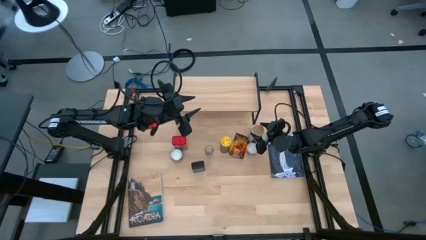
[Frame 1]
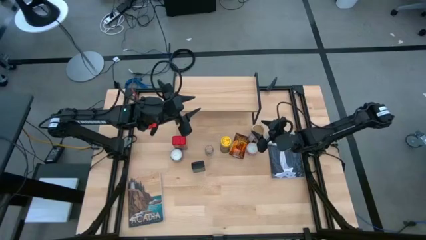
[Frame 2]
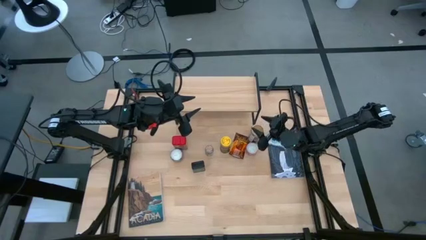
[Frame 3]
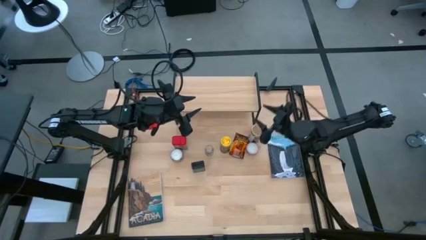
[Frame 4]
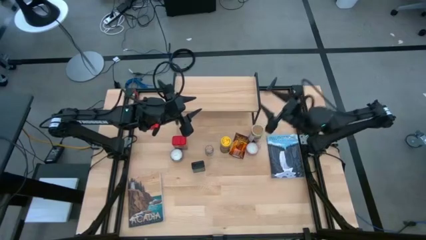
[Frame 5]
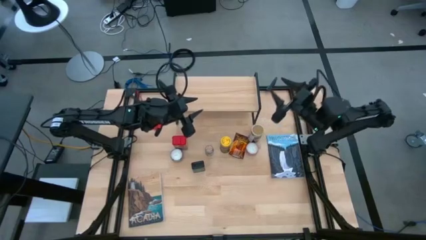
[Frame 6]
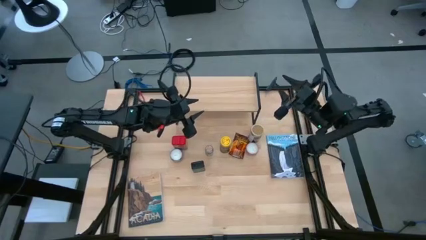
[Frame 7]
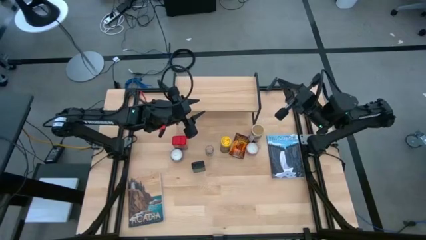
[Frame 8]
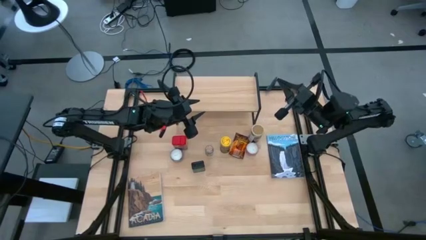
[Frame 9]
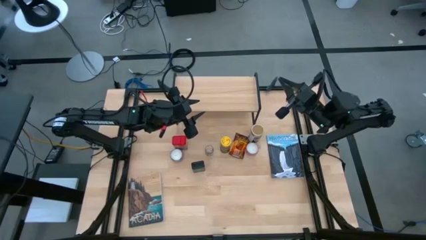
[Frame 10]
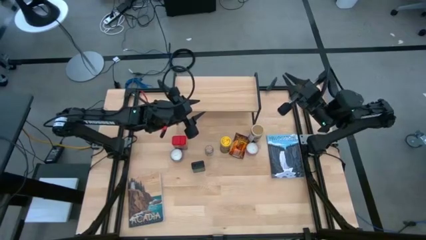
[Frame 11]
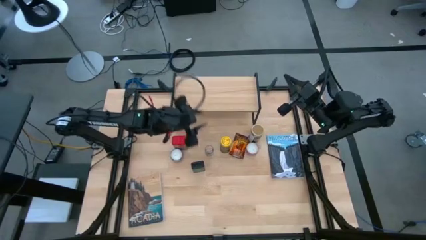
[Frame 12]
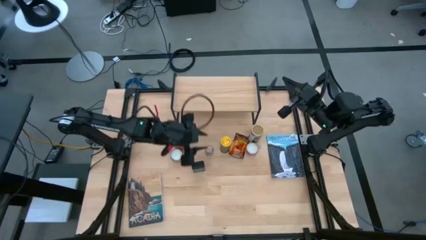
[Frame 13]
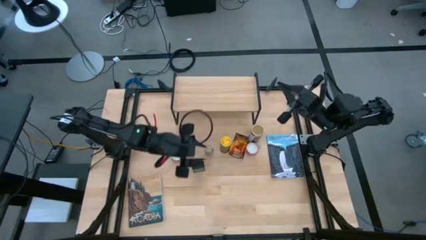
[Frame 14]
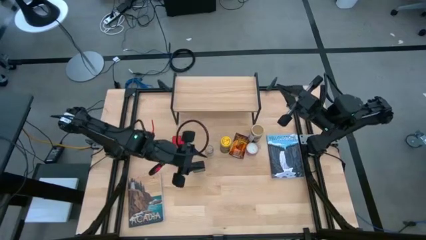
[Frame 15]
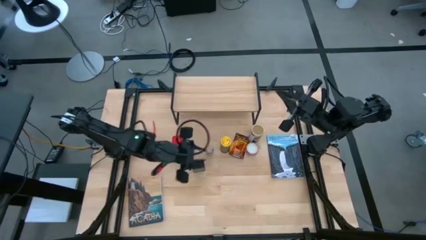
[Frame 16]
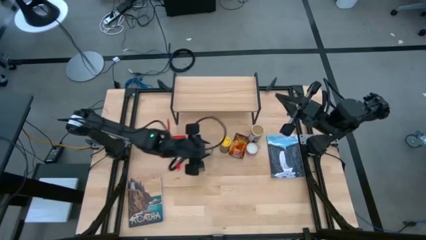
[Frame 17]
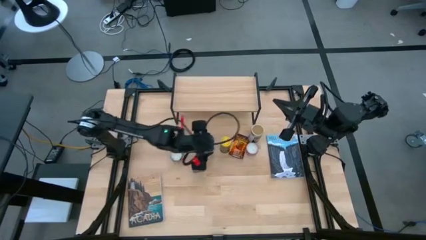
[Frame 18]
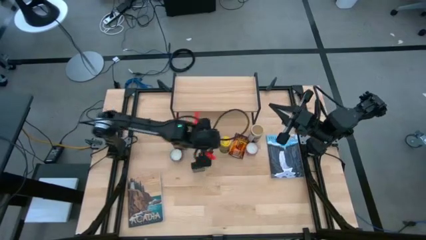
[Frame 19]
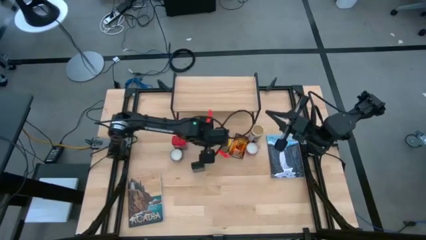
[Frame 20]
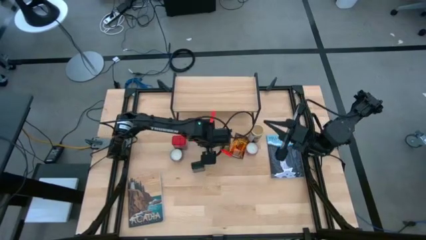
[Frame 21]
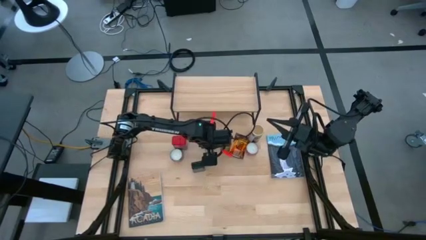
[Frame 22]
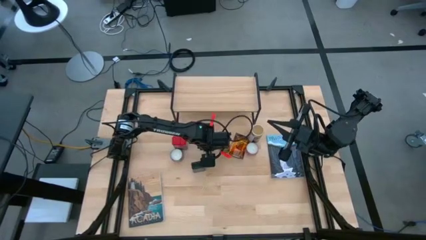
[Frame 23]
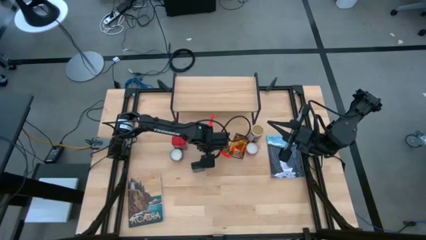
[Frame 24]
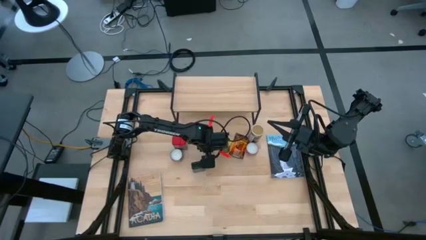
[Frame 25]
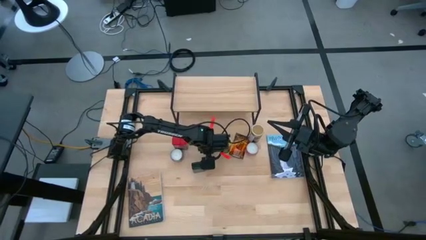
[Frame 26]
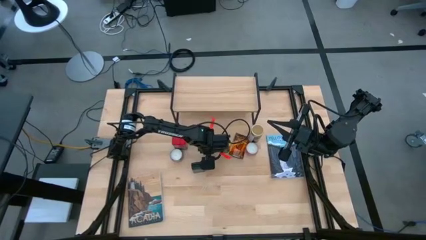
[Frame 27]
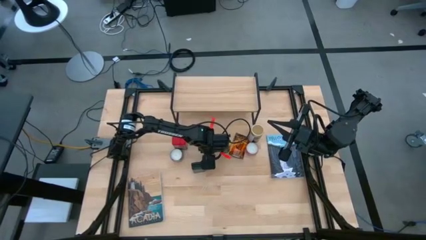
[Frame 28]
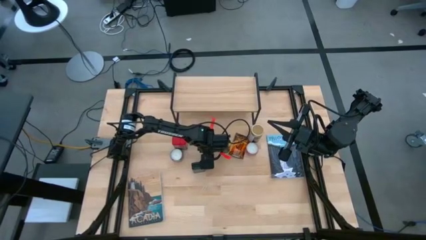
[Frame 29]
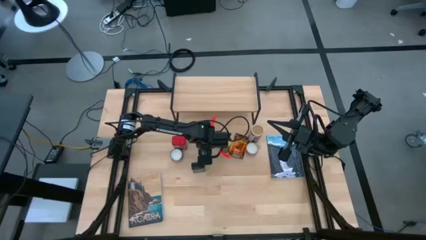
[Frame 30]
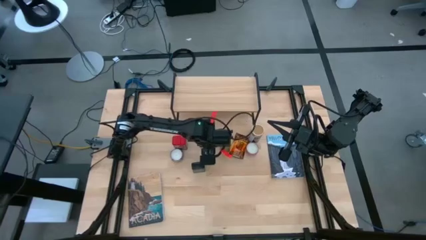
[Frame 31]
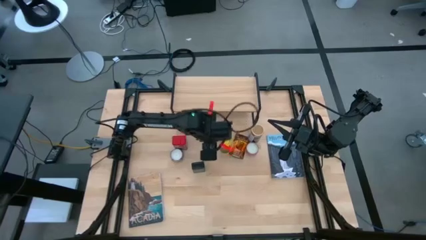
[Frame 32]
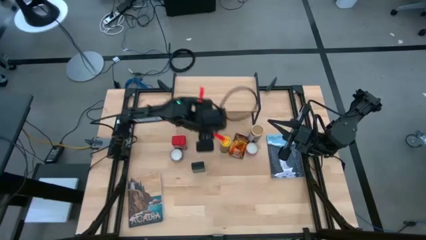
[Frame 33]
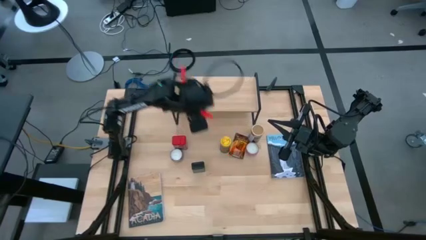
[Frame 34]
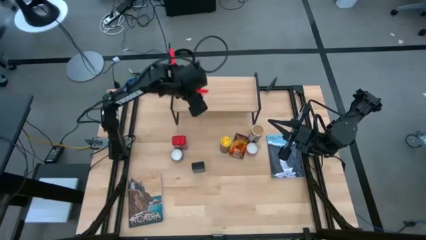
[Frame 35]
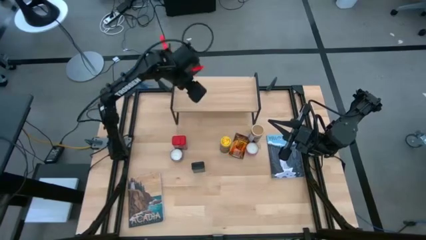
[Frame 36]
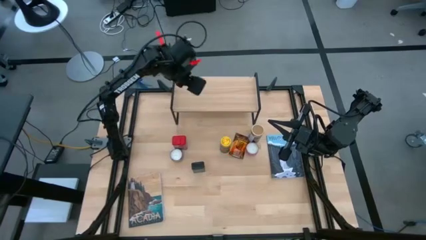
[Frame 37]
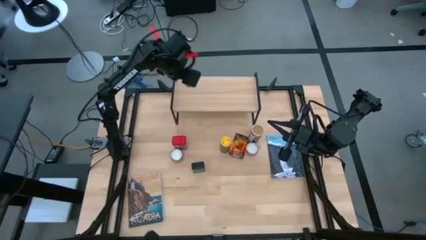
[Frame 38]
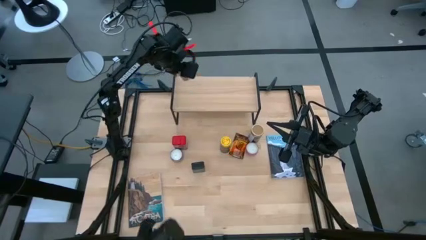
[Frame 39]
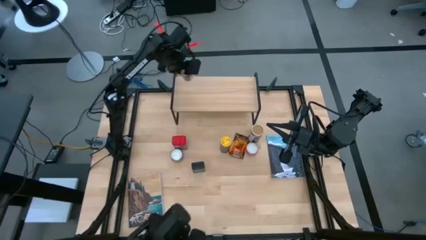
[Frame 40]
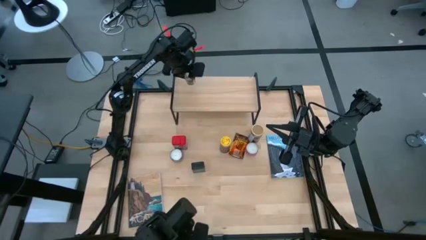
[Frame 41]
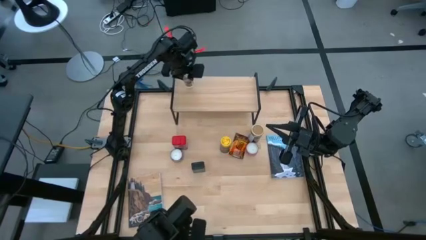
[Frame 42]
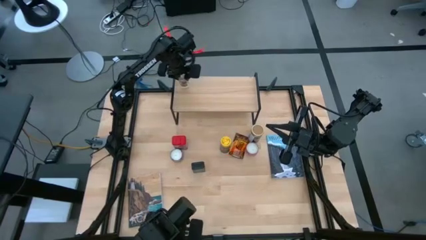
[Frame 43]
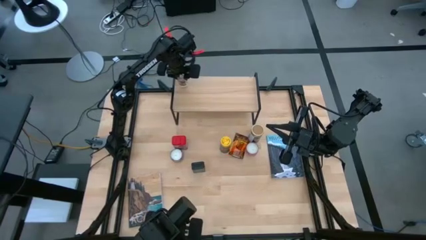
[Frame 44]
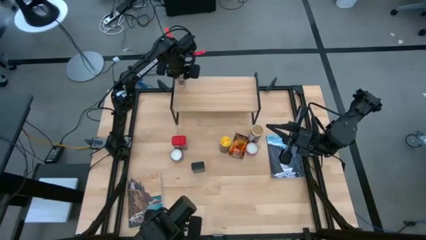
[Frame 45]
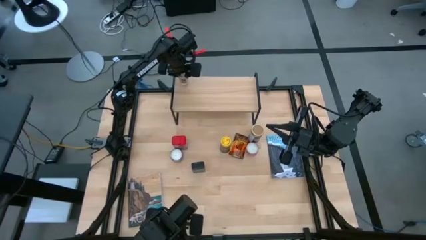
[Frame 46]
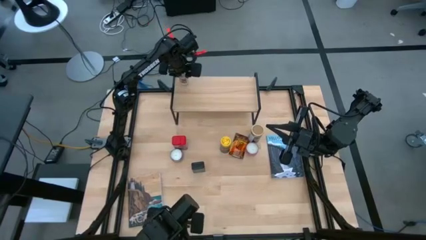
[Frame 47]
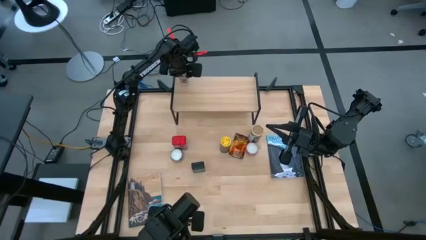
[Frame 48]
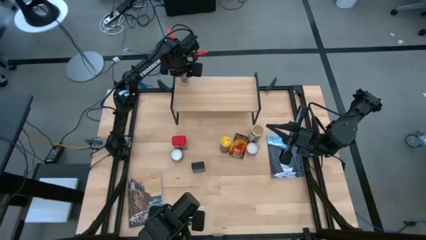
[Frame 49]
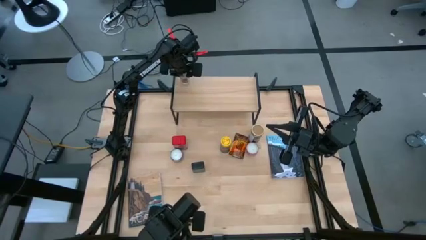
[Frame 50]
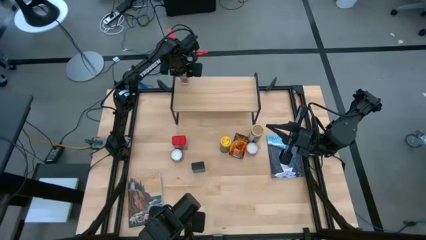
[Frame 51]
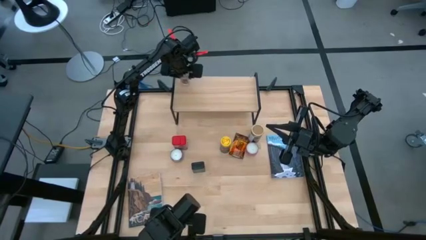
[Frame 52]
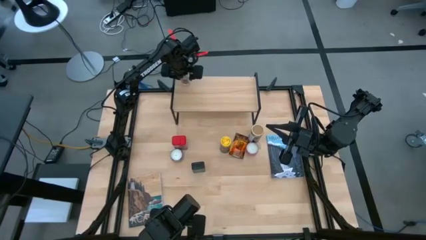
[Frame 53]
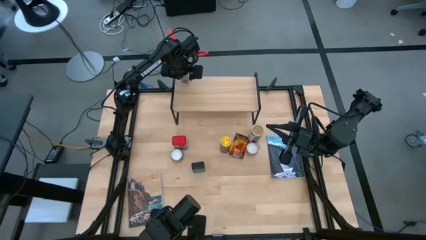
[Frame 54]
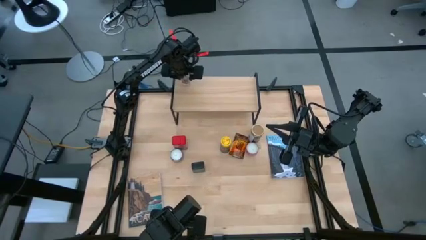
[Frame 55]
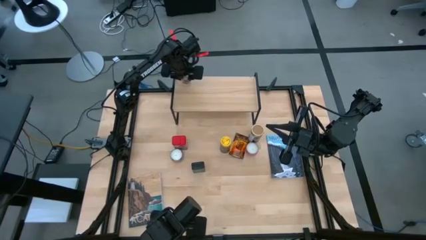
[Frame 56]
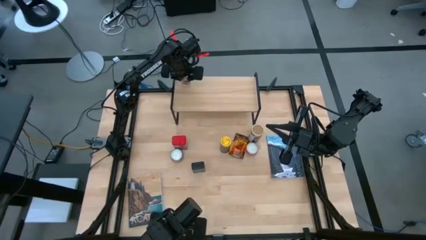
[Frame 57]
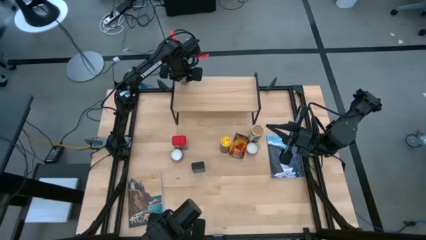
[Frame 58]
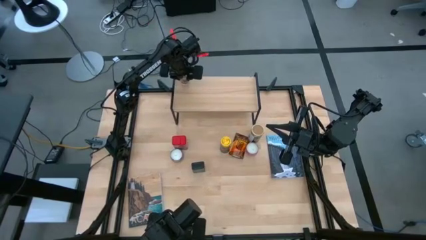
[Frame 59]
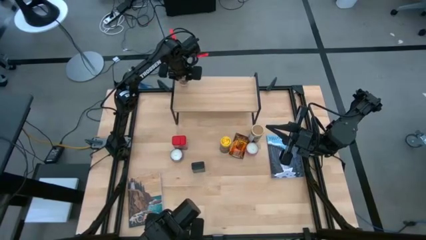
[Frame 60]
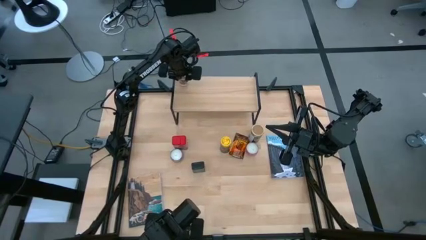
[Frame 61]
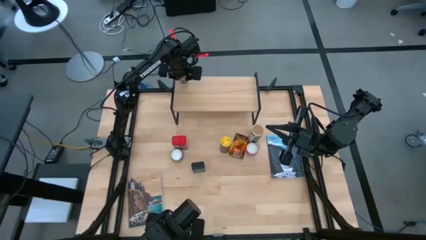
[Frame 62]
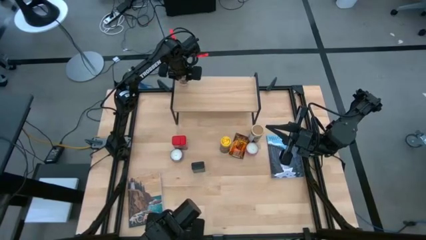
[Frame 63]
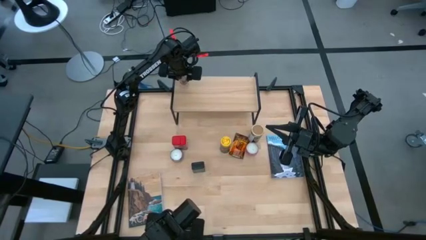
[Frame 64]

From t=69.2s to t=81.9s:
Task: Shelf spices
Put the brown seasoning bottle on the shelf

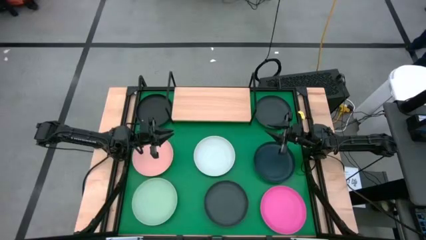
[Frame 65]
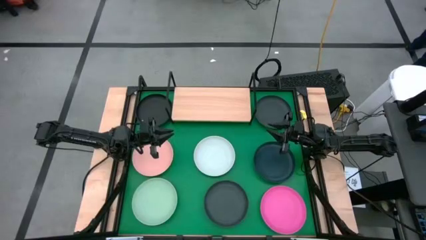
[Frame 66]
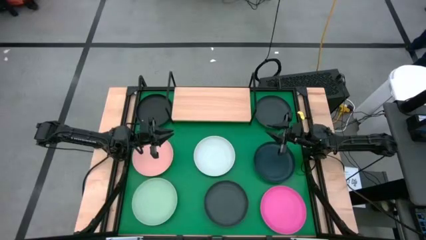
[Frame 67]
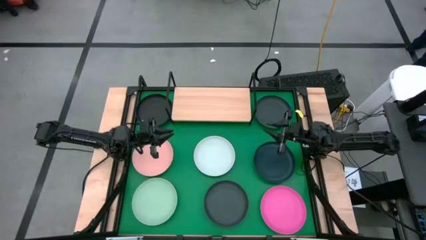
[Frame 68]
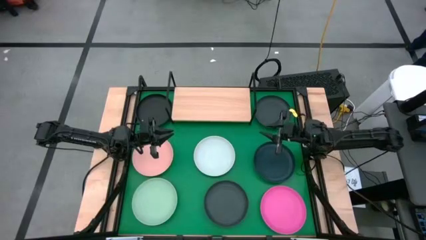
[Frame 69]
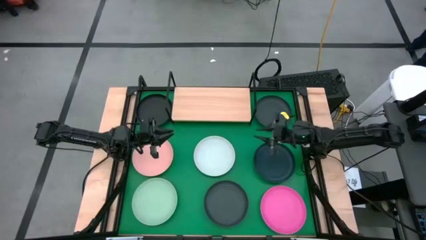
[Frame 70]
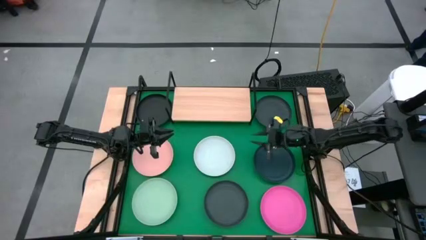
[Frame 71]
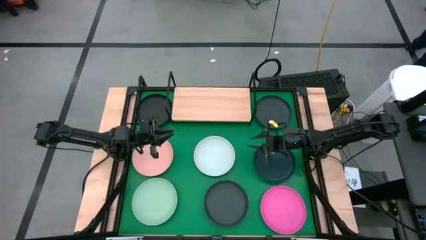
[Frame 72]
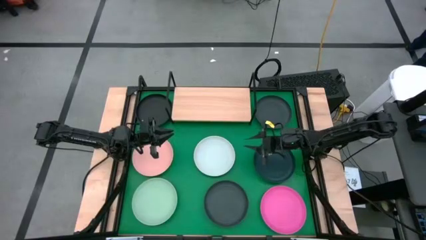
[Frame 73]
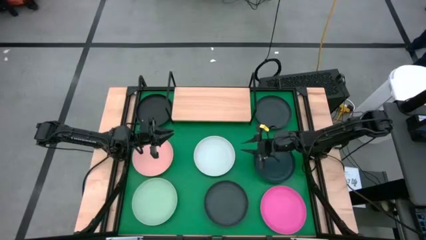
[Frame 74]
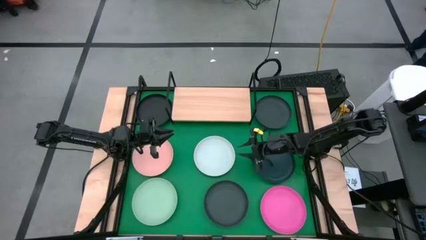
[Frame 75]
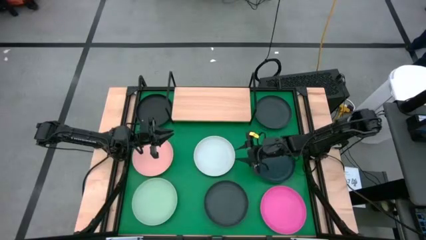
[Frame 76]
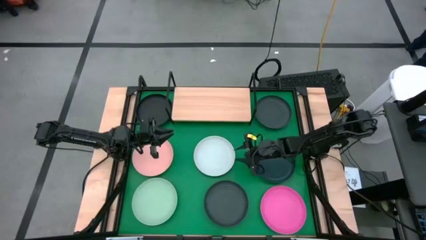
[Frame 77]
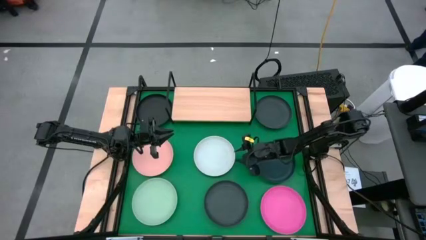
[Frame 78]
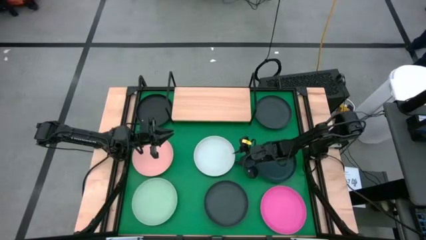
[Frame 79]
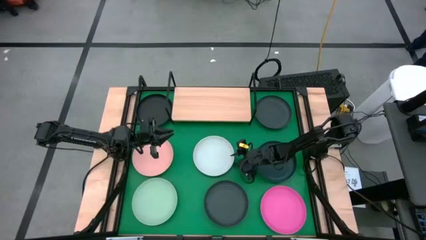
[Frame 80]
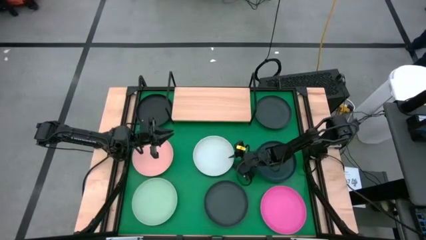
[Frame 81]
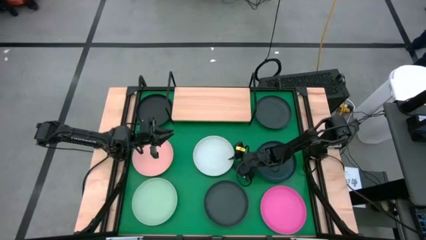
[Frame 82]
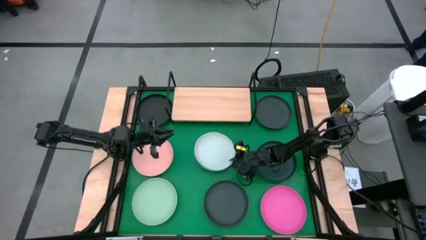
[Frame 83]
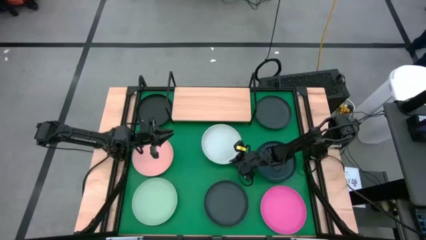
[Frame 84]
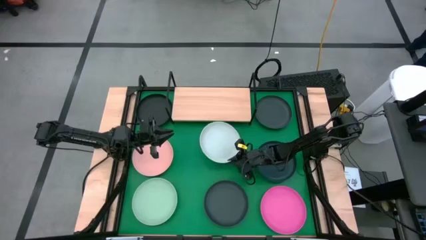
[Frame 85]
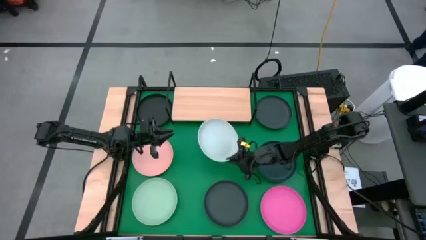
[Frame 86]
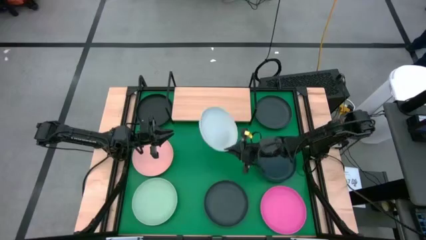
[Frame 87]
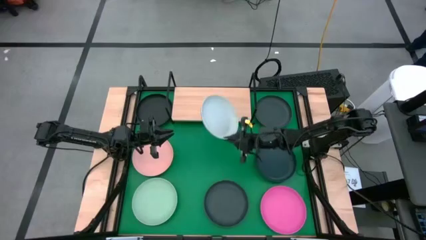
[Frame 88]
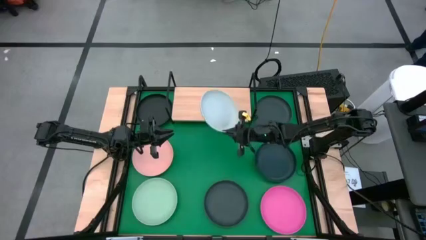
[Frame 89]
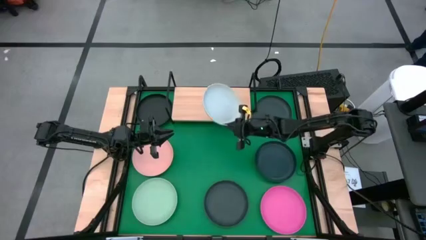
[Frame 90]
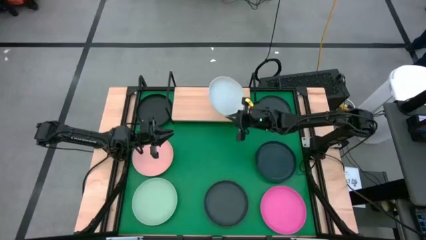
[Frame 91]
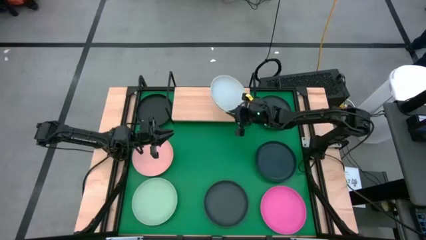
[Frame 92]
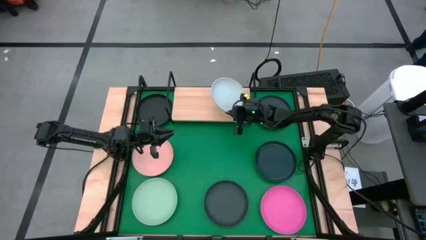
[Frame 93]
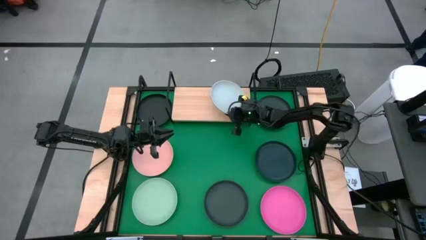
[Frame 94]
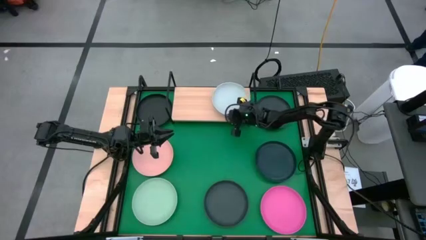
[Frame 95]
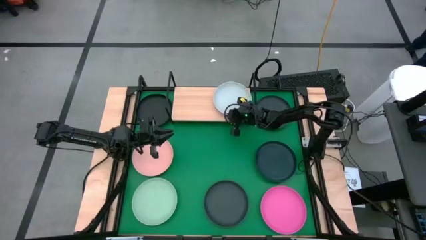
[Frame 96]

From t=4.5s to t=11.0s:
Task: Place and stack plates onto a shelf
Put the white plate on the shelf
